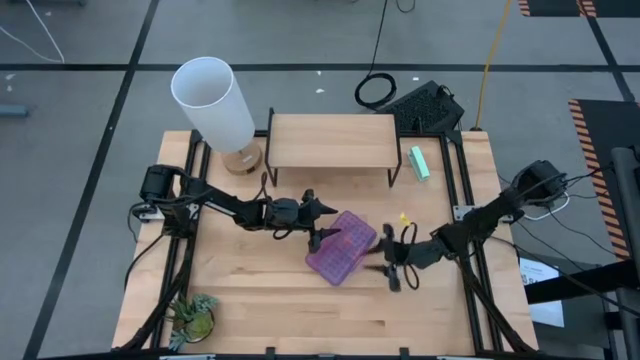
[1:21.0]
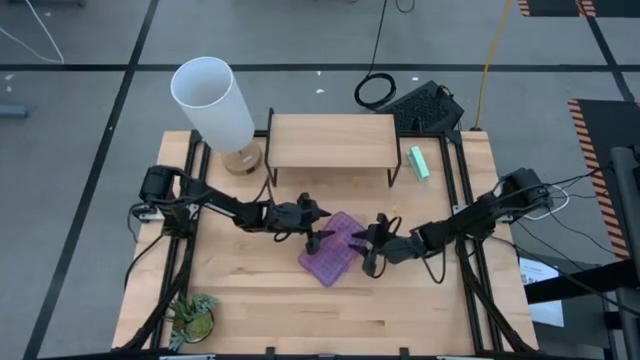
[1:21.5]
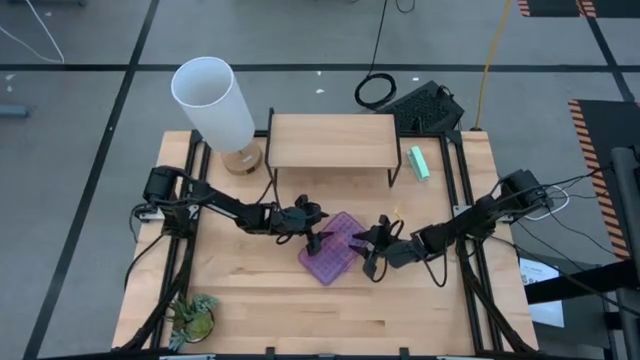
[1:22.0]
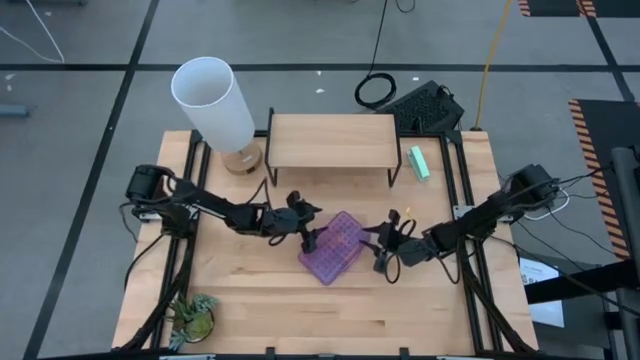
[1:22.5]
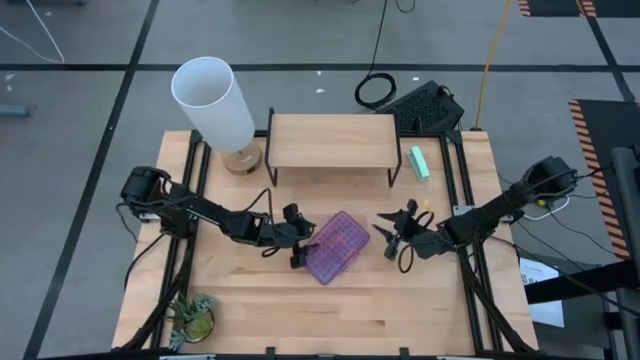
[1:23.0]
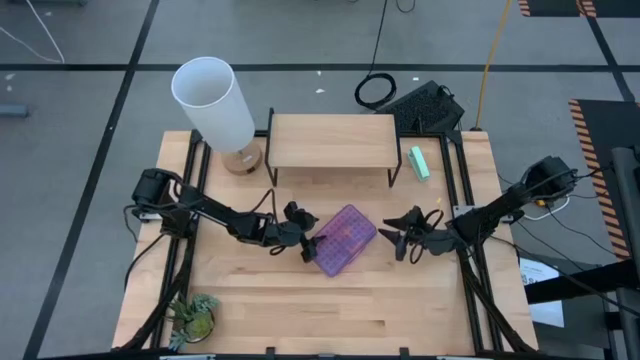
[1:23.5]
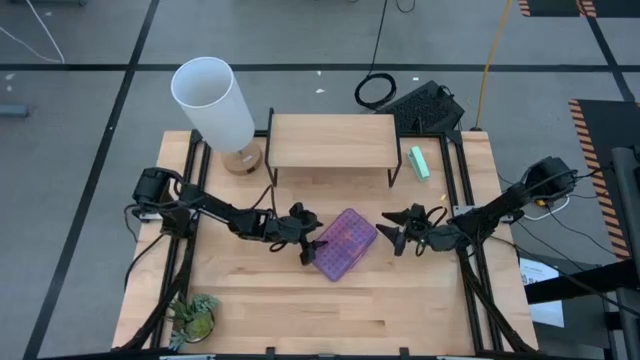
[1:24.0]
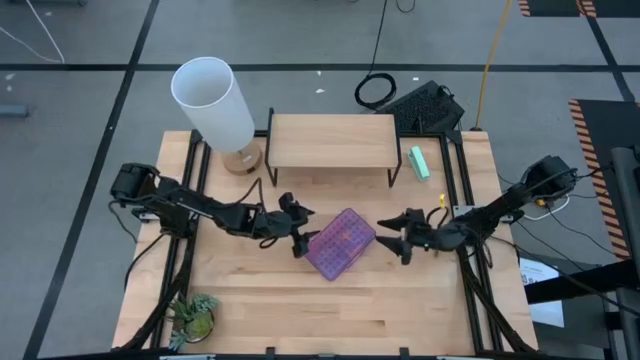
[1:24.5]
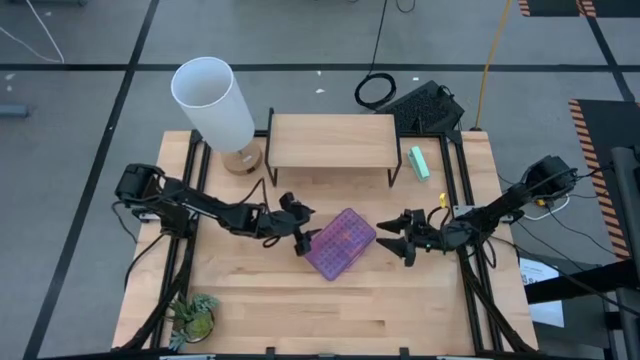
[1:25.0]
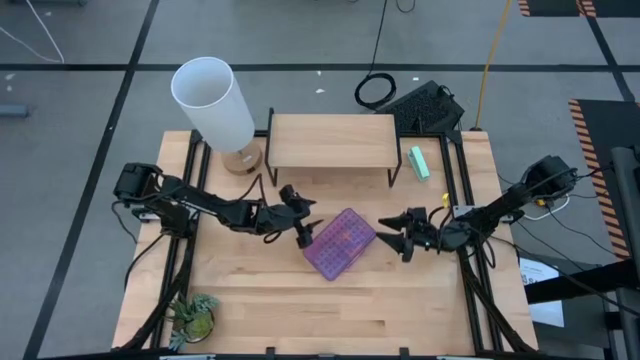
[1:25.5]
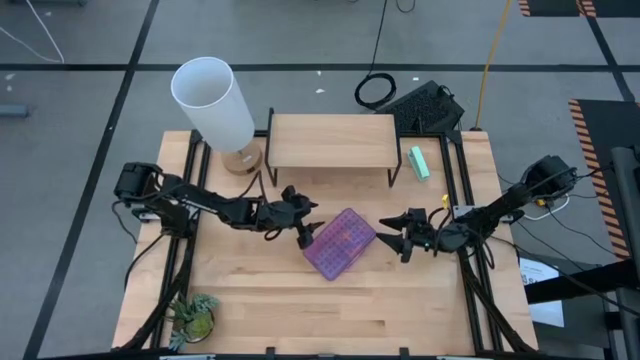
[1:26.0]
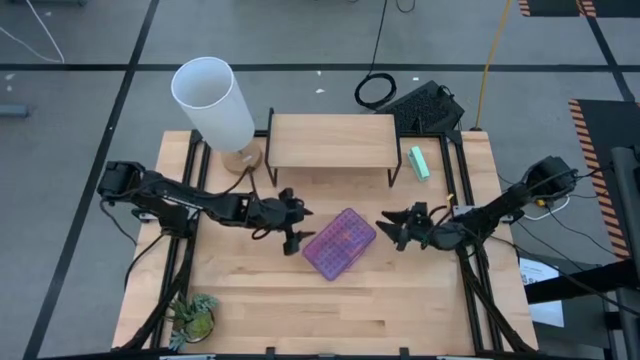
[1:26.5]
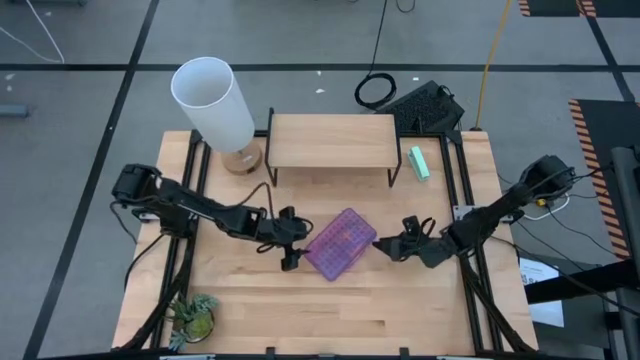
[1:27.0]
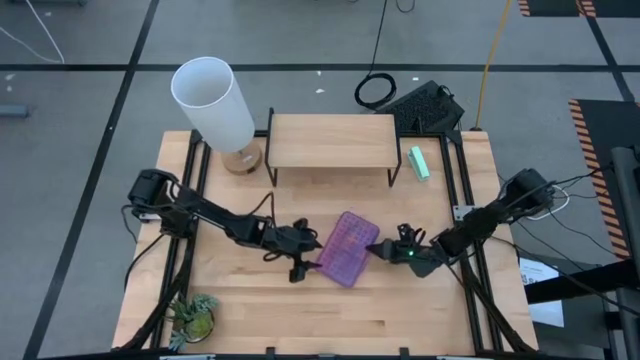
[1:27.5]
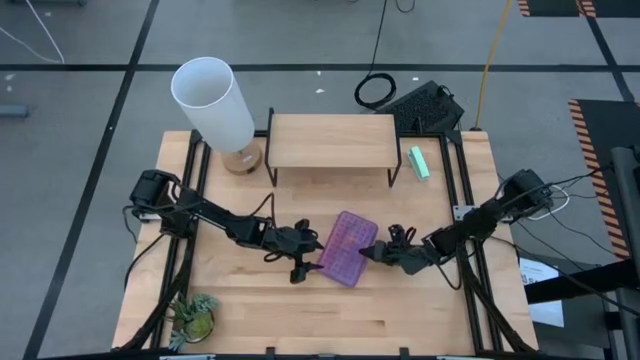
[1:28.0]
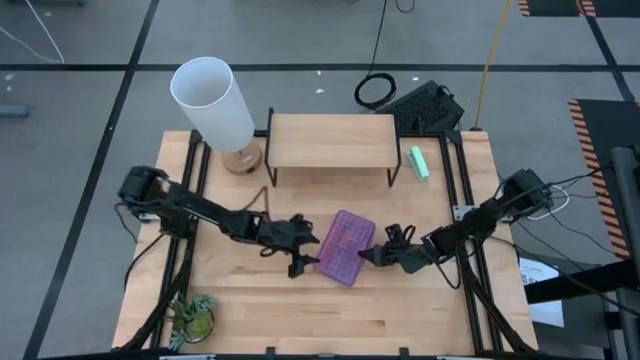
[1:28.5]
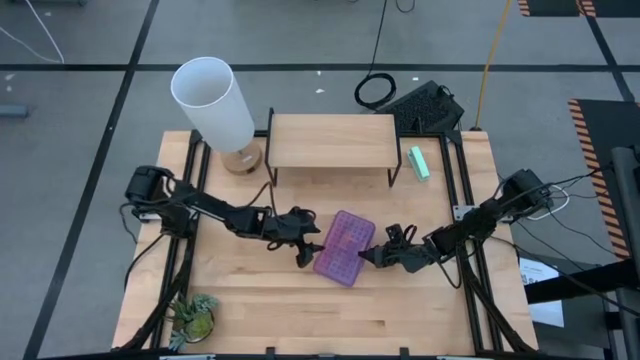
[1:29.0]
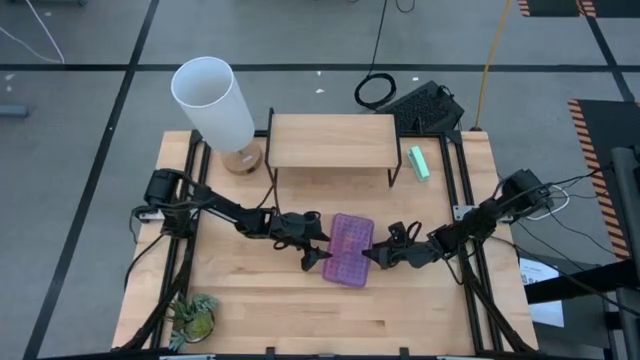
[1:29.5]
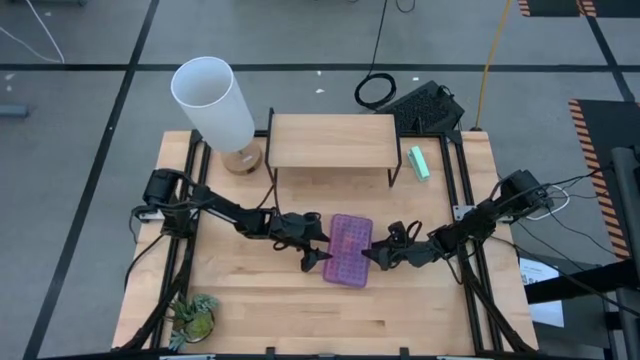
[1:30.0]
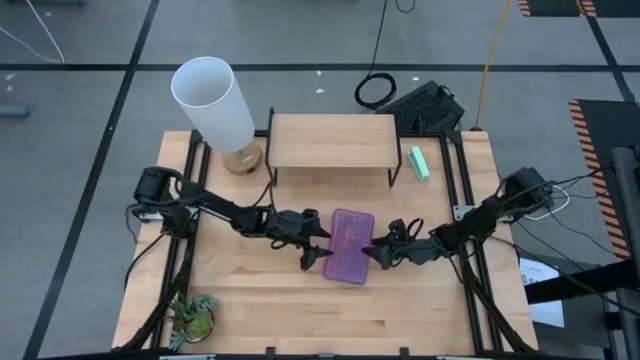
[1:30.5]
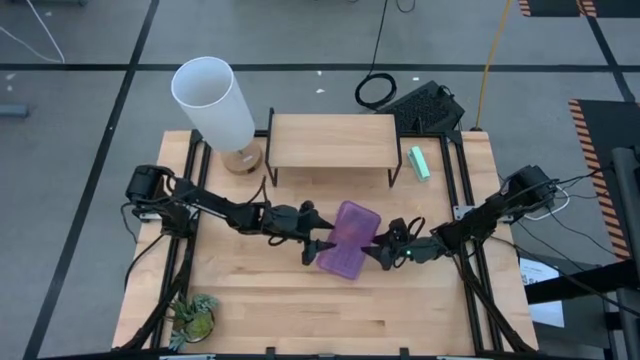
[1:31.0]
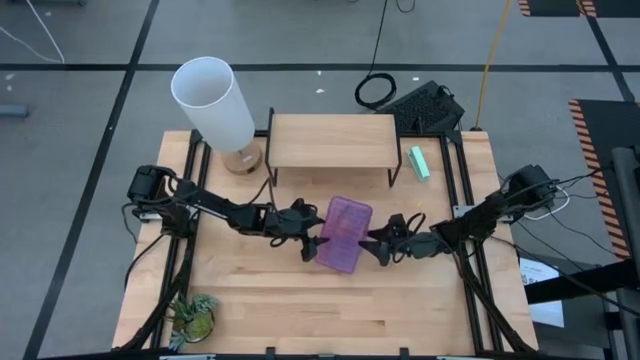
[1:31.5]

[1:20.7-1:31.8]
Task: Pack school essentials
Put the violet supply box on the shelf

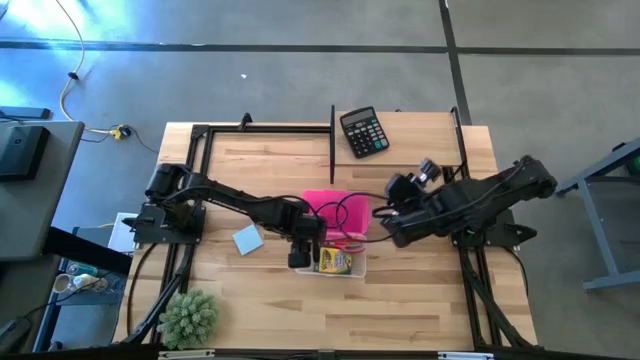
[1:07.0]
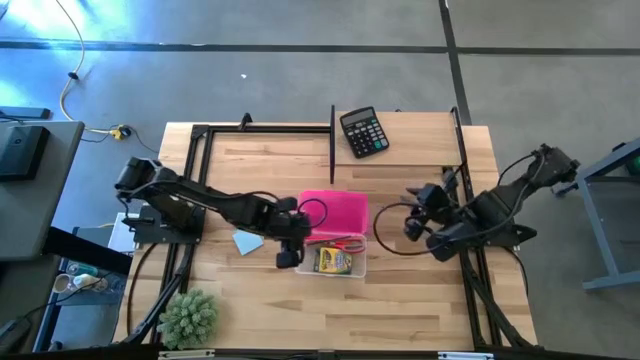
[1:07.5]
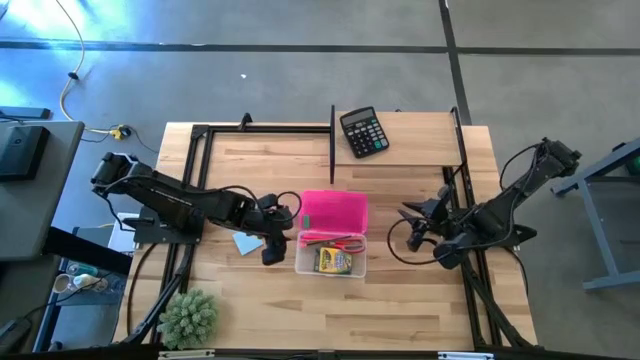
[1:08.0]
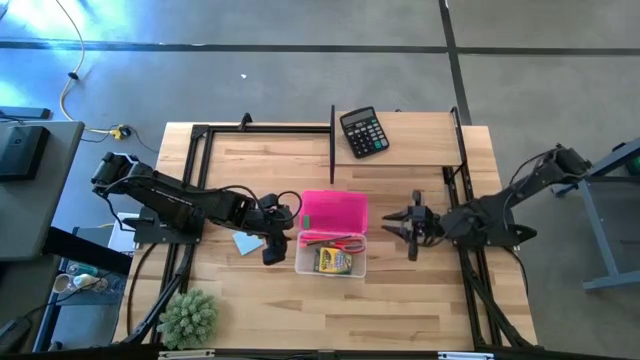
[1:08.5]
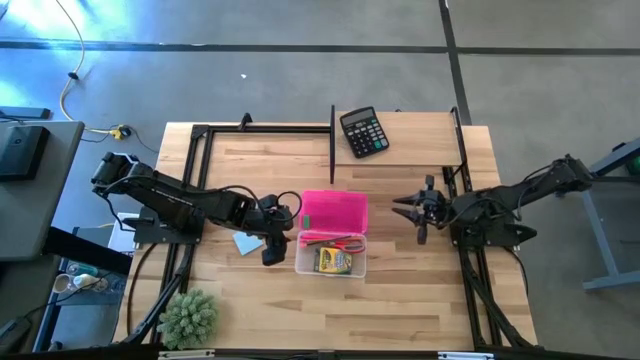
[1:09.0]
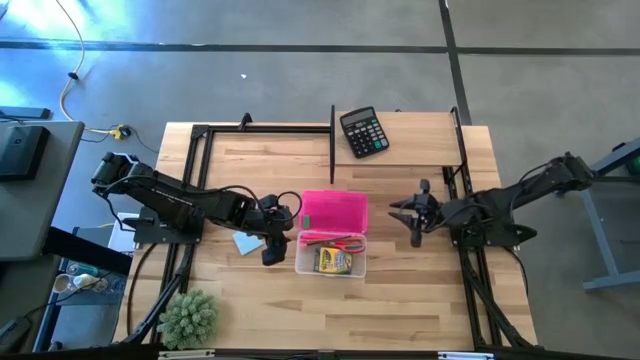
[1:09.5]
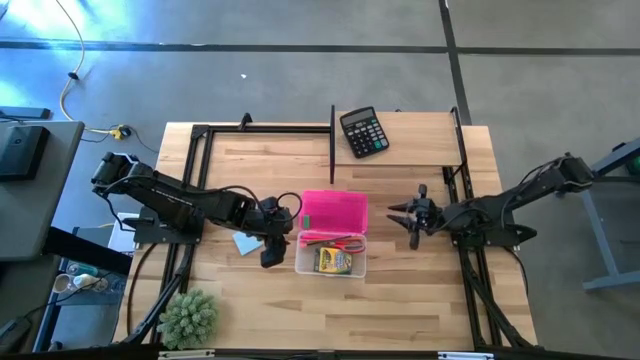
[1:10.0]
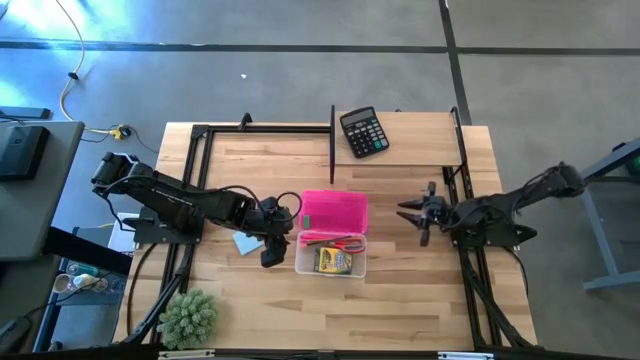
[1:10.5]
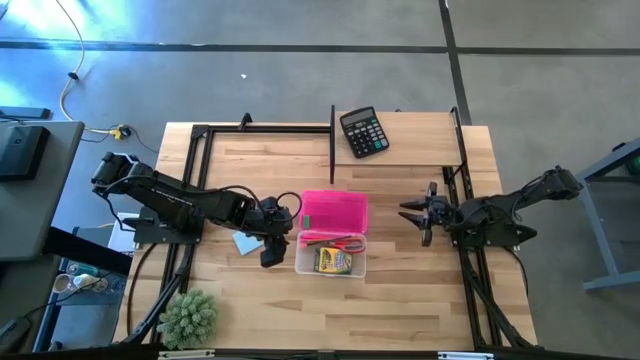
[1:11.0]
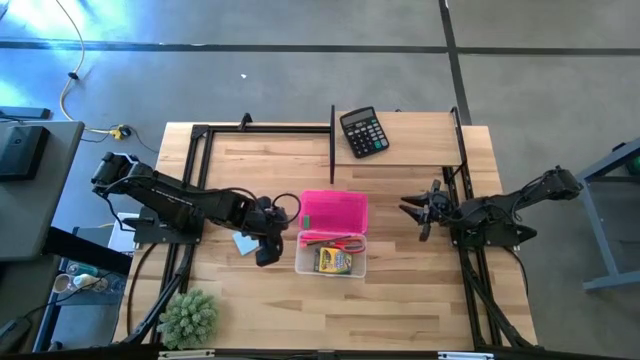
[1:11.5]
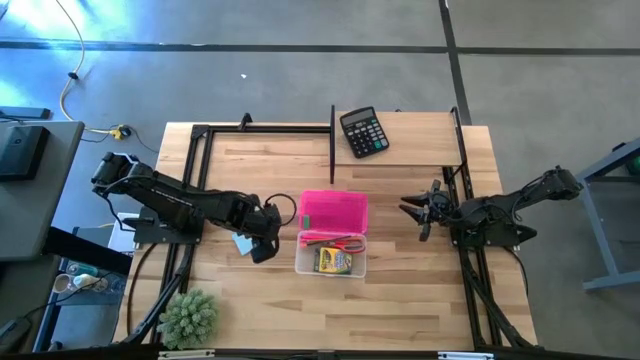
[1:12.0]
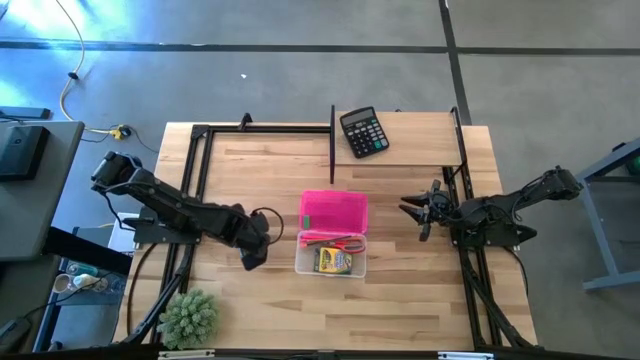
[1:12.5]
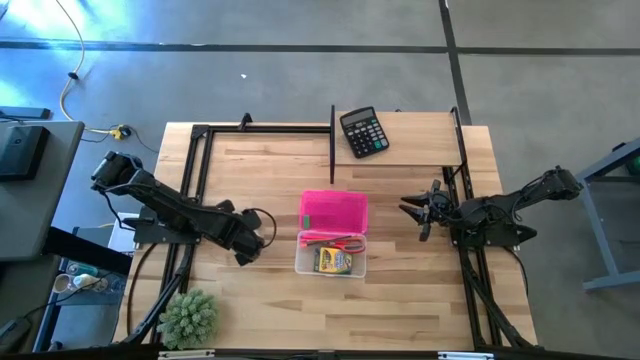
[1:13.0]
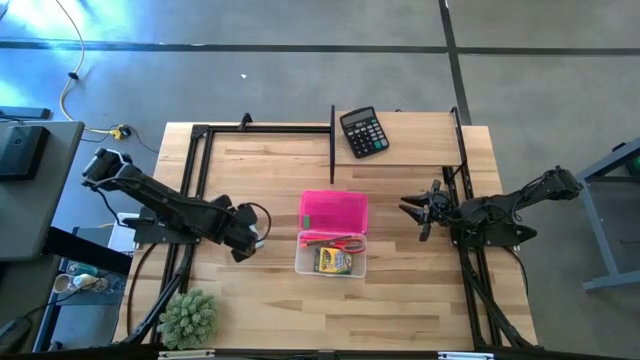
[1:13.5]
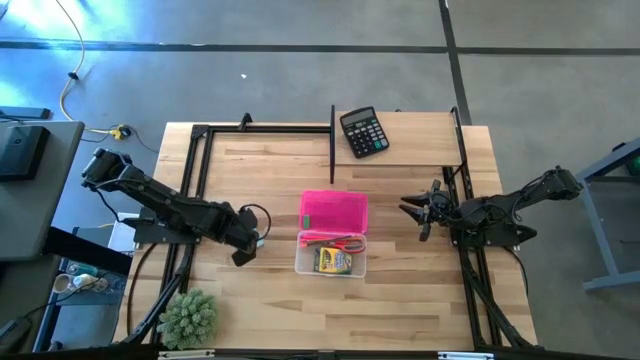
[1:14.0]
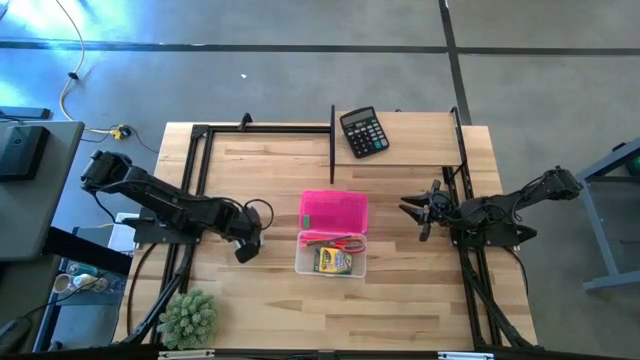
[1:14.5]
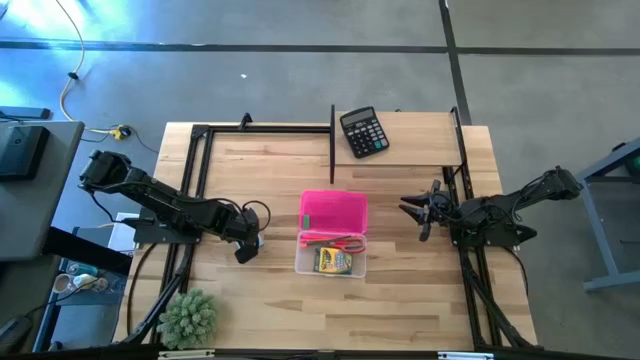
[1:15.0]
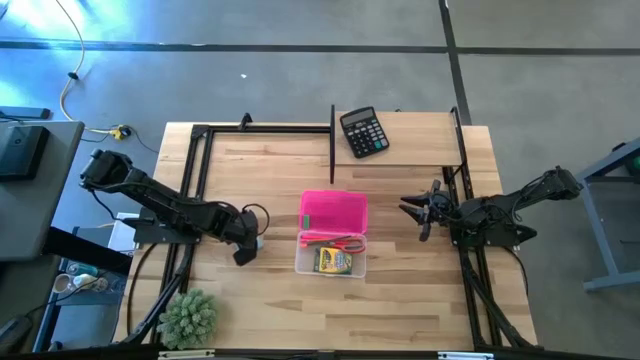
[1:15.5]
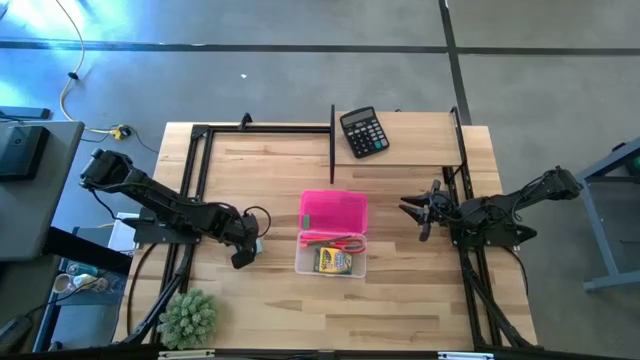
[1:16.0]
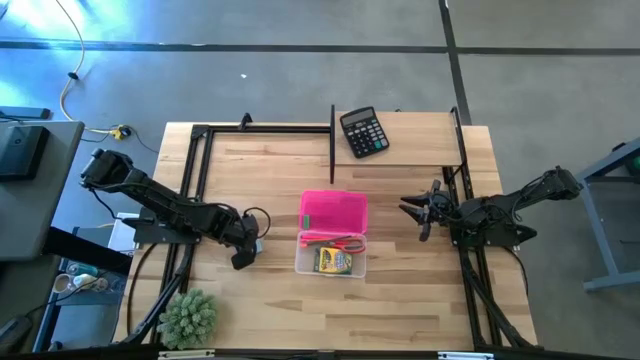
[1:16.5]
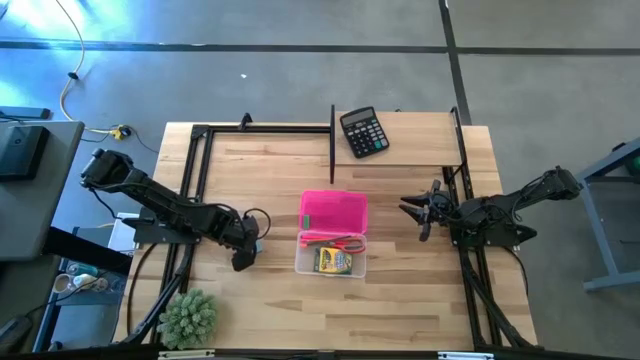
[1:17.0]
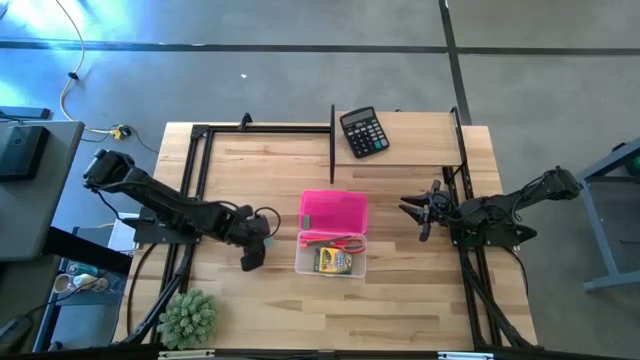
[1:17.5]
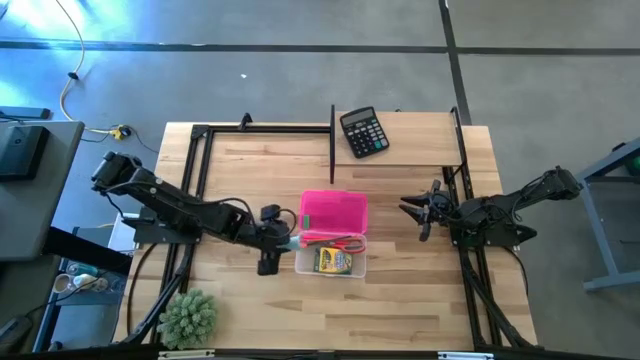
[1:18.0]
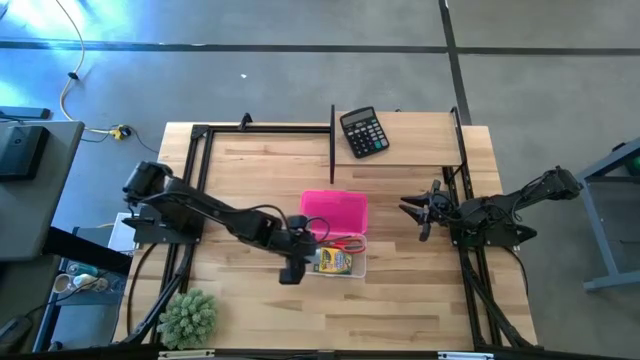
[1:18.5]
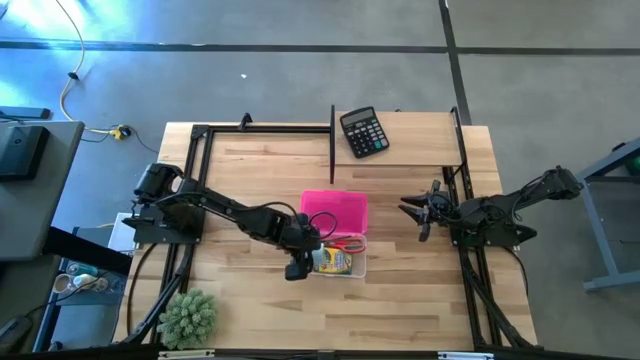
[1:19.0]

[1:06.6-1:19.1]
Task: Pack school essentials
Put the blue sticky note into the pink supply box
